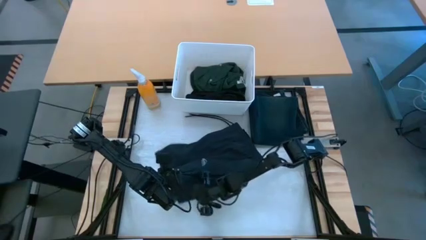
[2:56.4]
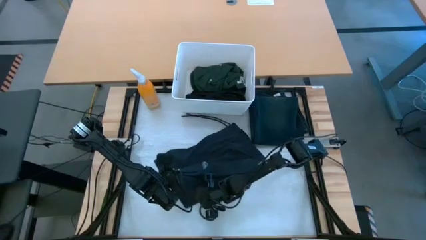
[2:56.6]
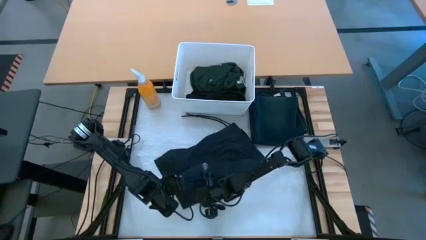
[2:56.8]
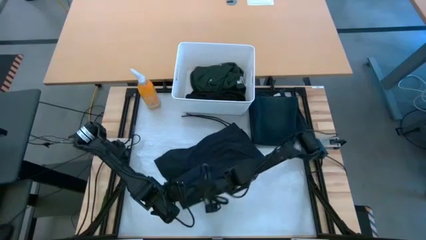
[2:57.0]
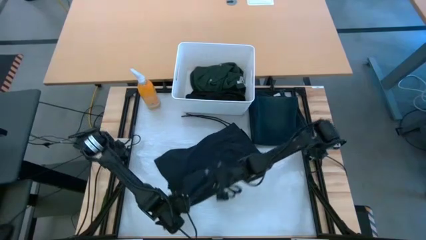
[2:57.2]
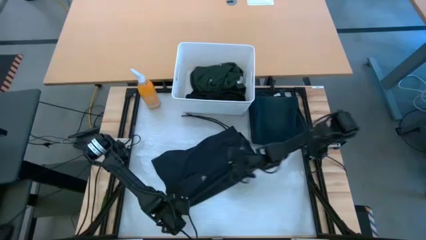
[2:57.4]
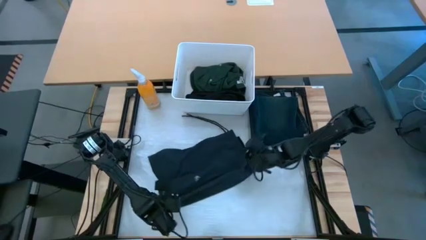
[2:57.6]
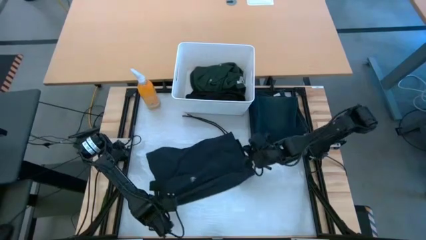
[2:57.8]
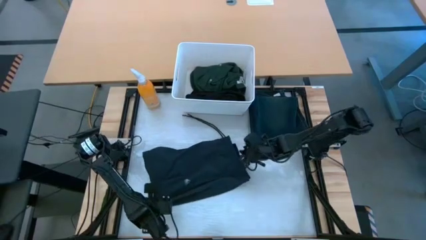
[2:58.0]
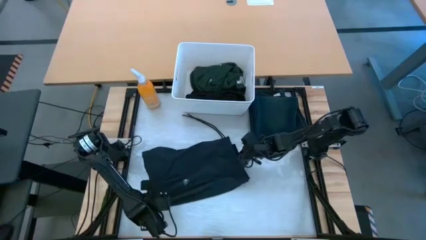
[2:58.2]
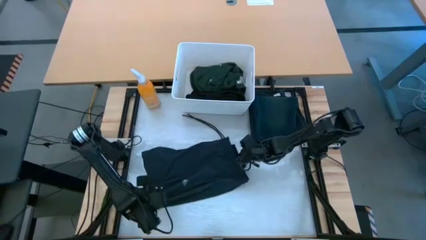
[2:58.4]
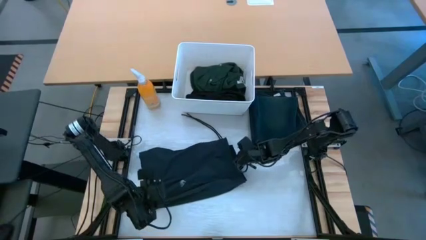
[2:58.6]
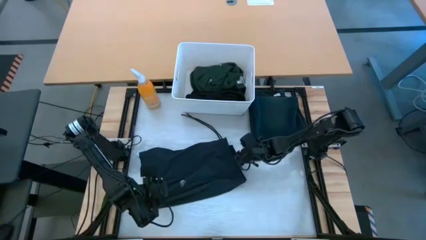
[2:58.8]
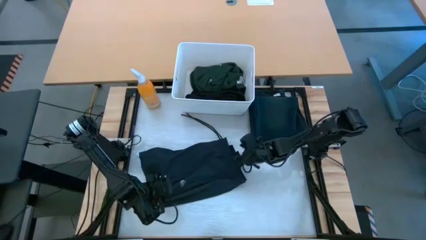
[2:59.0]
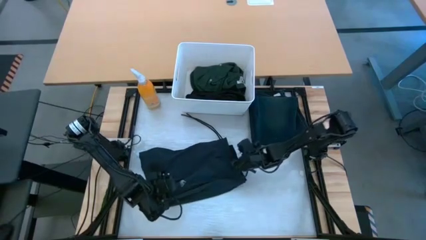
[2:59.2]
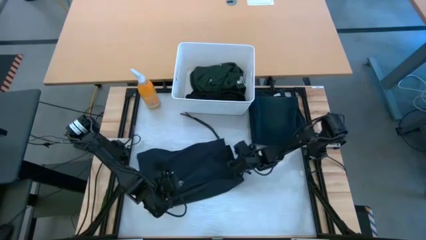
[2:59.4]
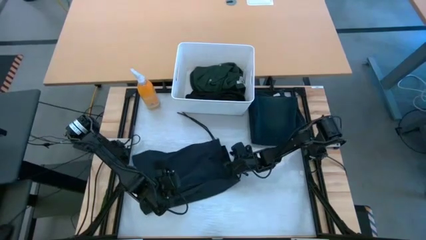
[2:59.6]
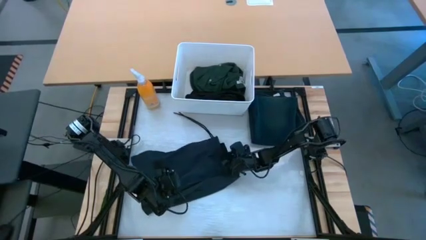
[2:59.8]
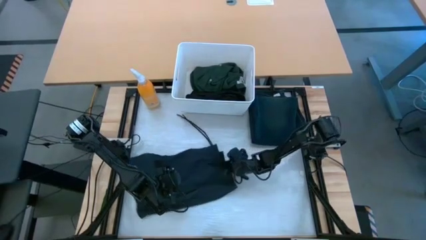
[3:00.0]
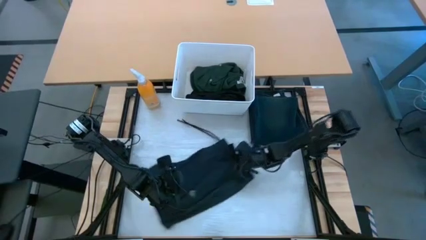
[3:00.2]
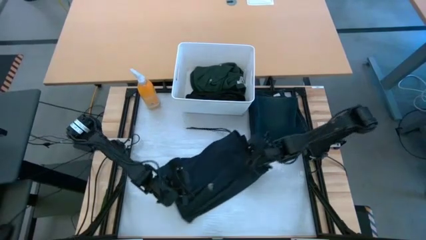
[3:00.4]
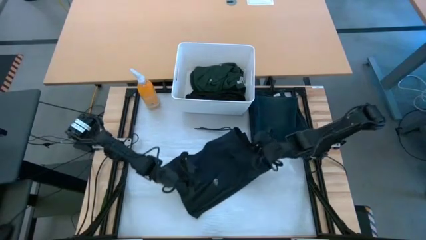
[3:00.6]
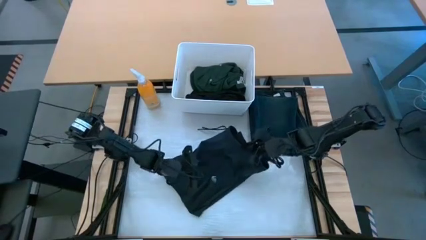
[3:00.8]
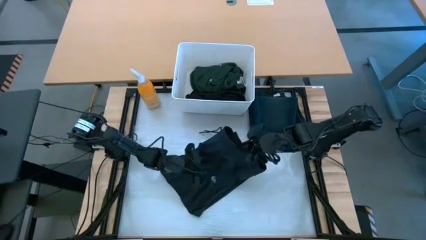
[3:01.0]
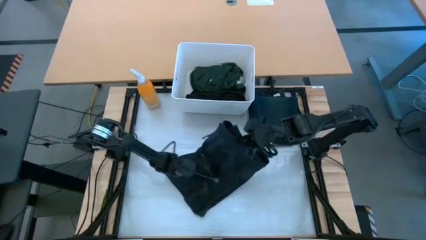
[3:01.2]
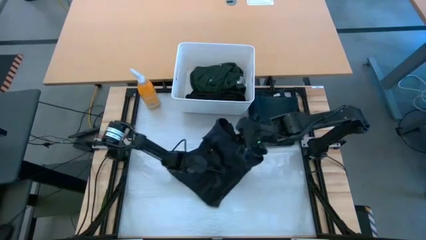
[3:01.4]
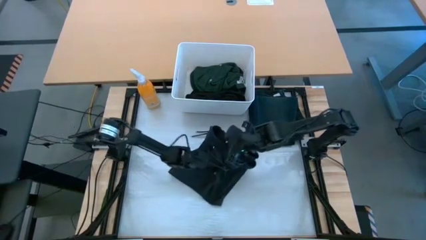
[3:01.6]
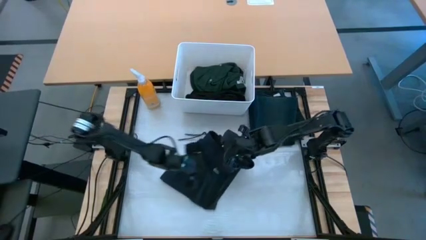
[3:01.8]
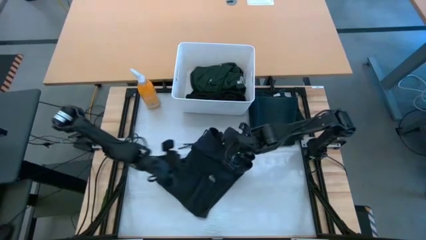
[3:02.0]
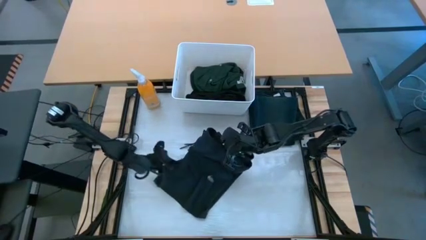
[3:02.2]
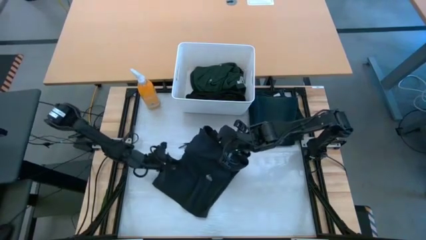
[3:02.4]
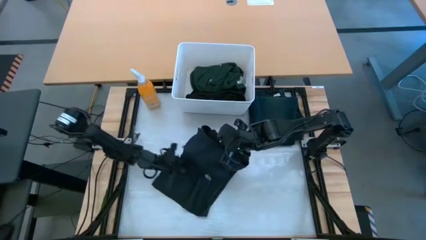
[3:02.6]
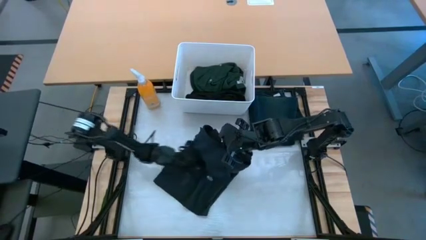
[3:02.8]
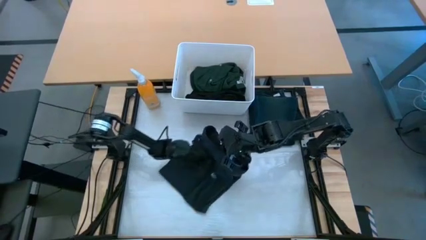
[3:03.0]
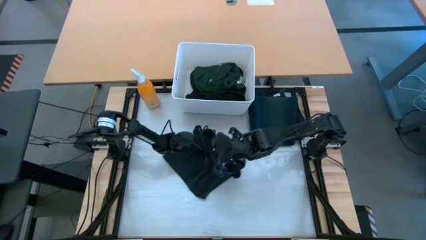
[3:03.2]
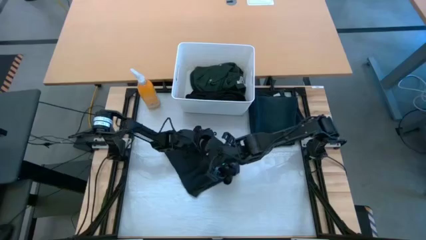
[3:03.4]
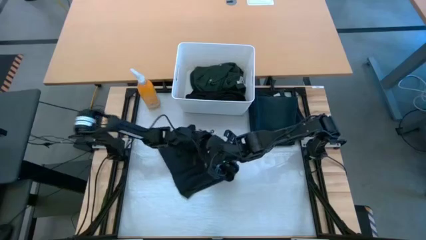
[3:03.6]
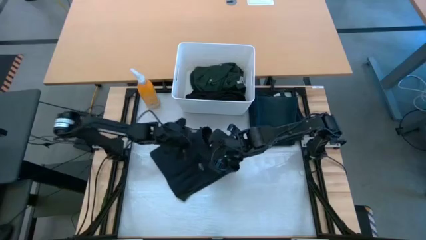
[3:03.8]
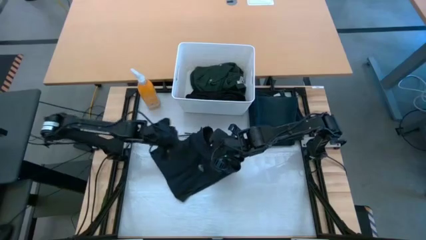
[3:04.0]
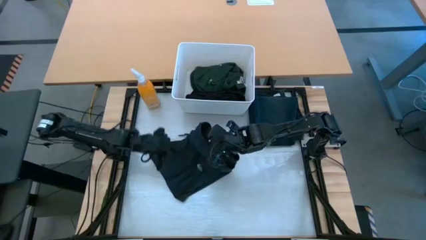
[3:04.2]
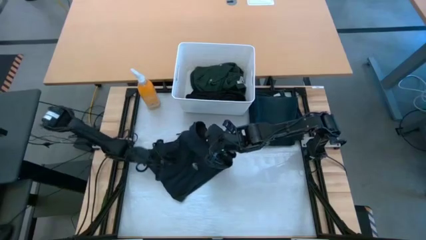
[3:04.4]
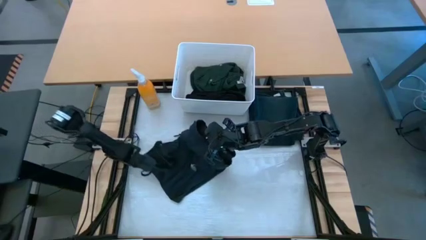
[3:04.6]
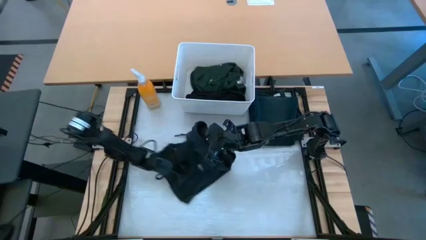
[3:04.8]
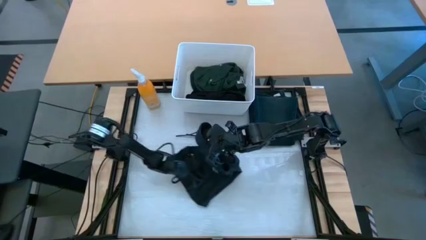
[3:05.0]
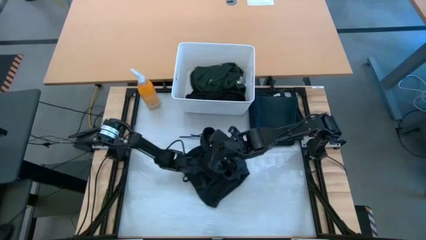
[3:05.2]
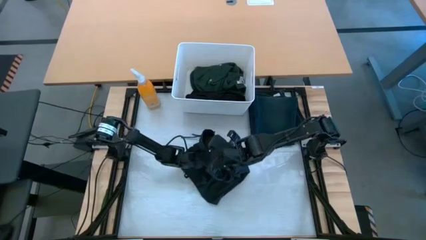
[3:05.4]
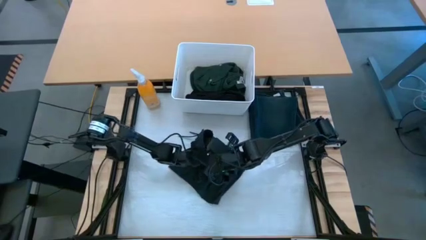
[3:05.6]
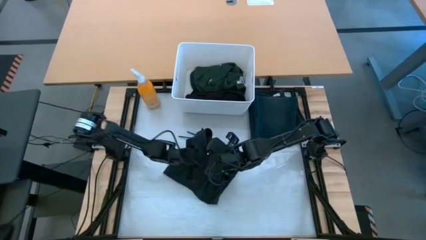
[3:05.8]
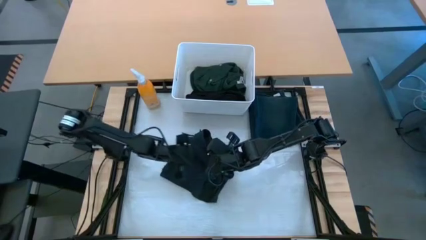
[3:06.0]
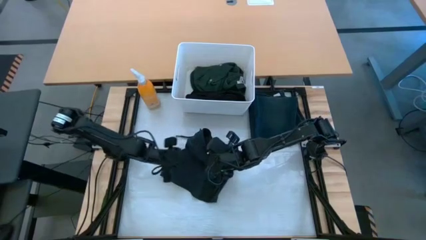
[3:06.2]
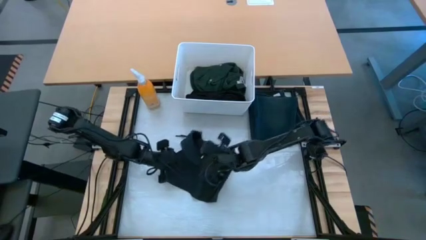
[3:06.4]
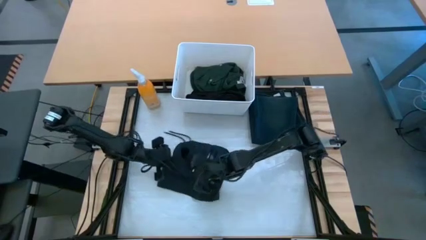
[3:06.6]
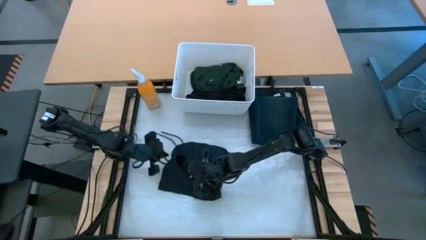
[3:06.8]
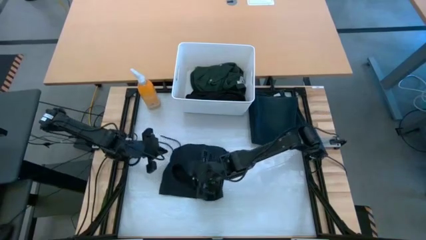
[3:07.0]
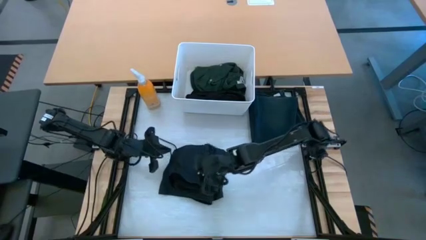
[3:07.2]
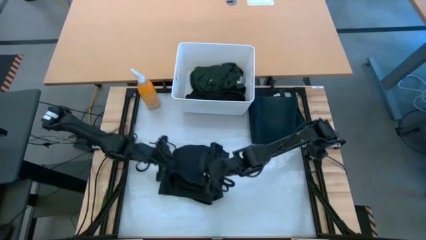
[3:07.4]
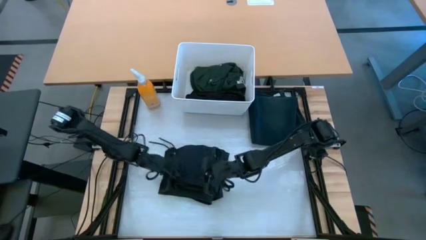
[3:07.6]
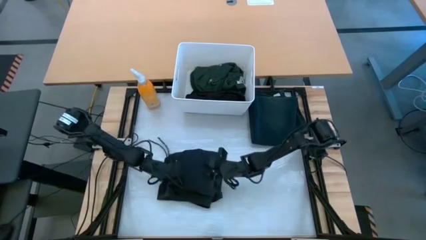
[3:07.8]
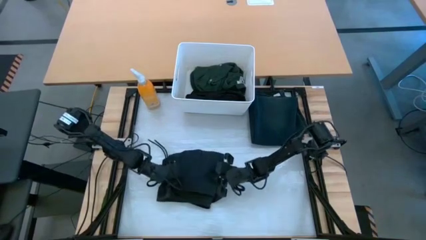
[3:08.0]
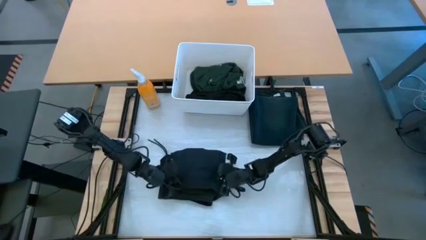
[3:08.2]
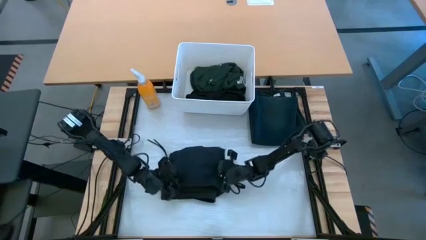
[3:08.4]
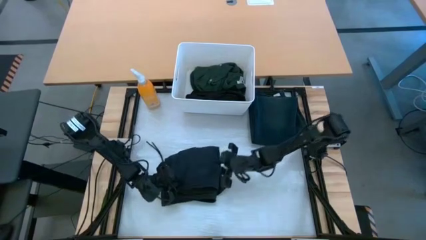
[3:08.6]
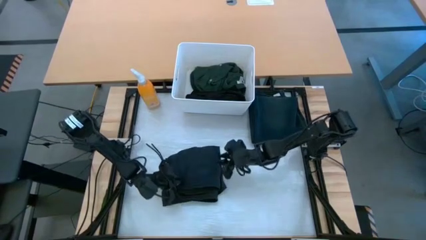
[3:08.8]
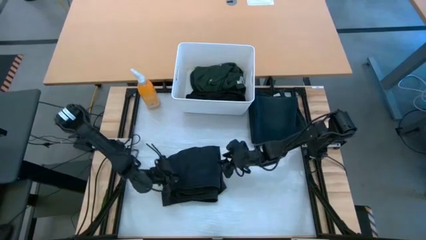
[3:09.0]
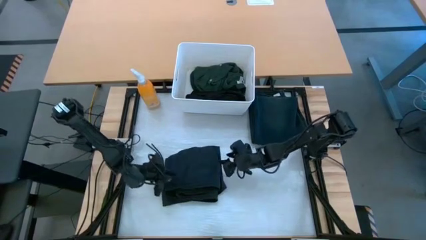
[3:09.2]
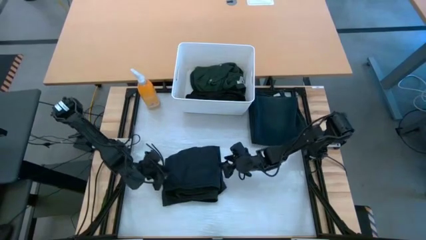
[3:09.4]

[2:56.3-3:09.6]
Task: Fold laundry
Fold the black shorts

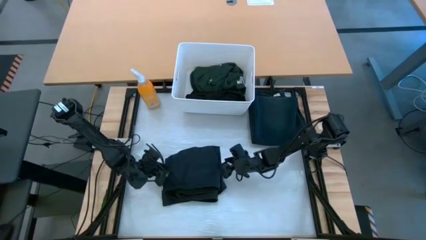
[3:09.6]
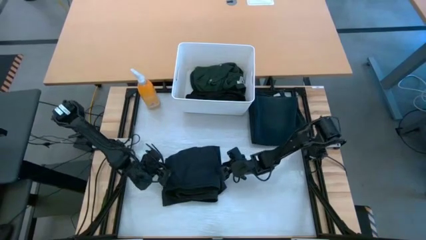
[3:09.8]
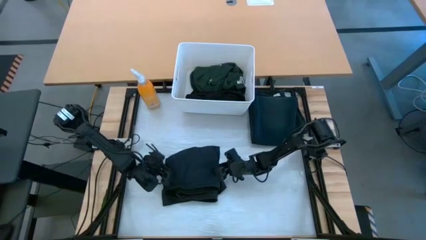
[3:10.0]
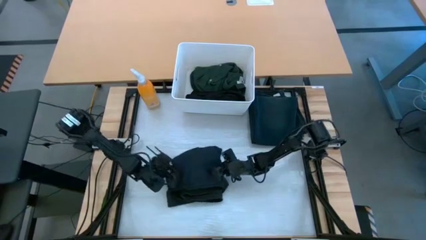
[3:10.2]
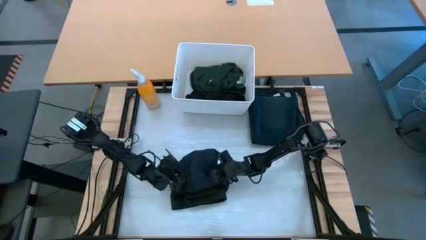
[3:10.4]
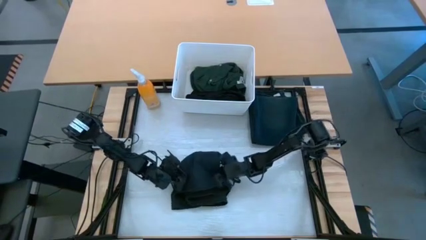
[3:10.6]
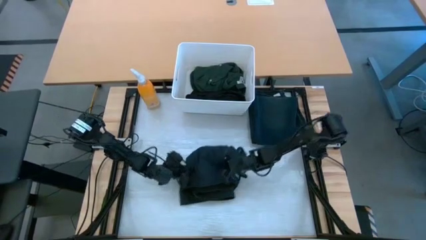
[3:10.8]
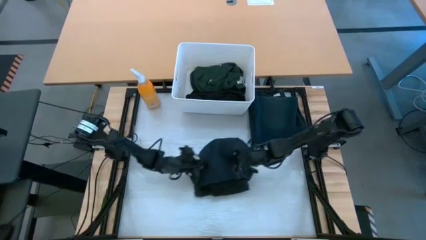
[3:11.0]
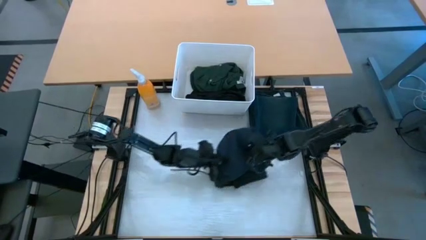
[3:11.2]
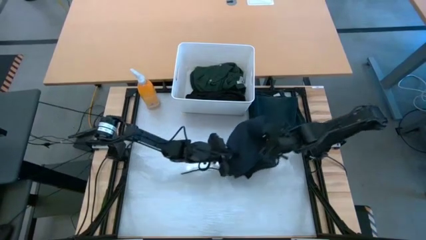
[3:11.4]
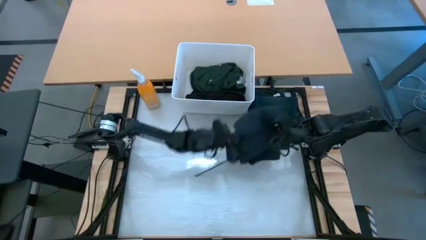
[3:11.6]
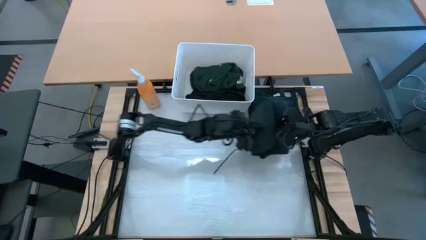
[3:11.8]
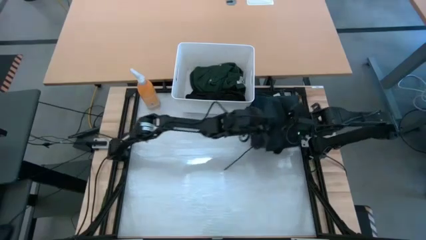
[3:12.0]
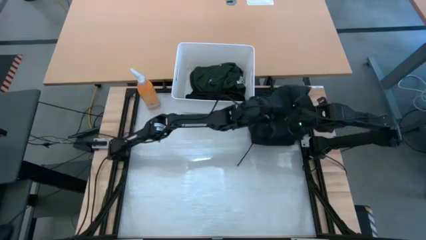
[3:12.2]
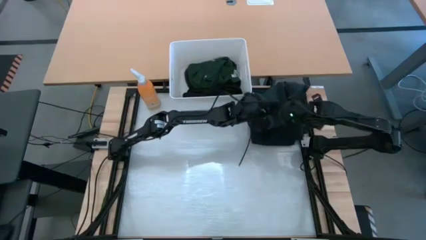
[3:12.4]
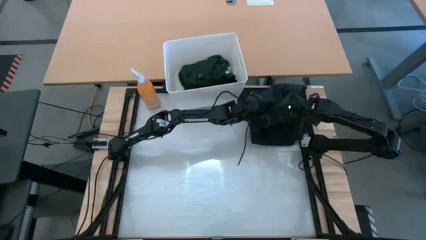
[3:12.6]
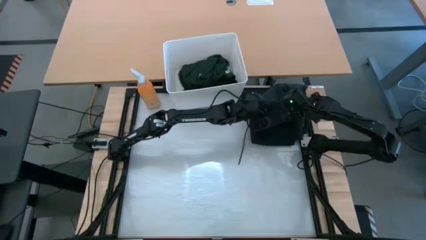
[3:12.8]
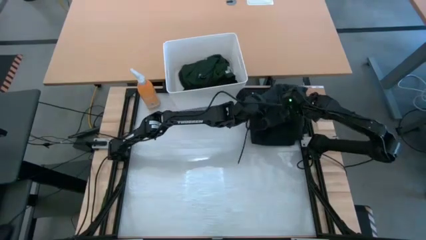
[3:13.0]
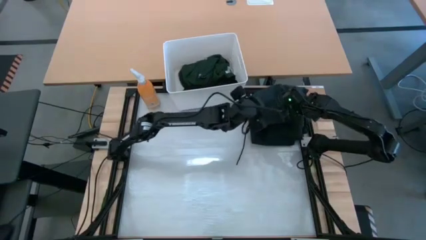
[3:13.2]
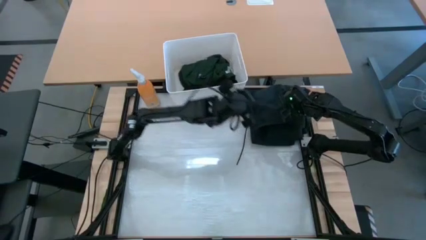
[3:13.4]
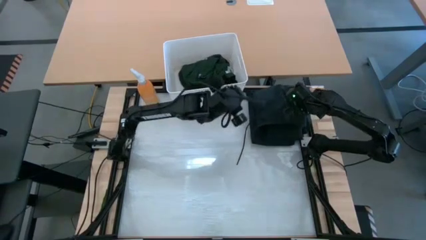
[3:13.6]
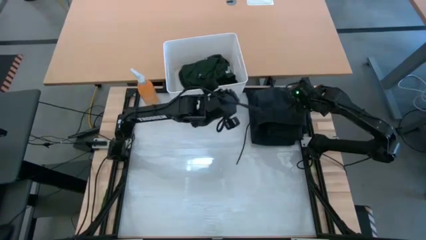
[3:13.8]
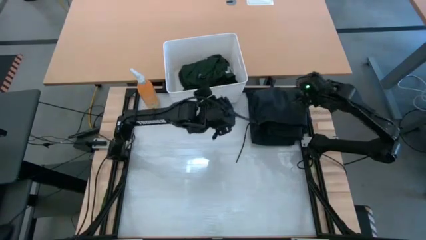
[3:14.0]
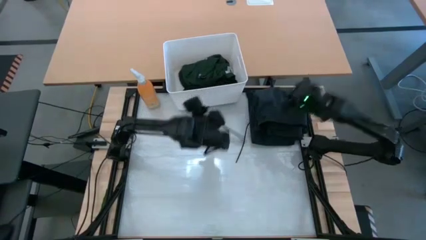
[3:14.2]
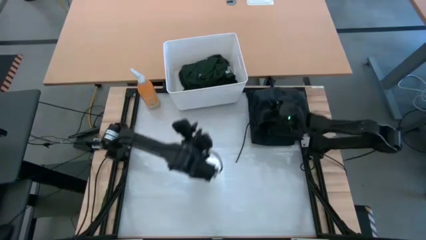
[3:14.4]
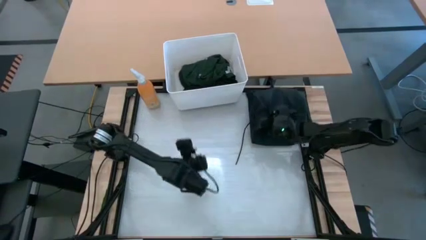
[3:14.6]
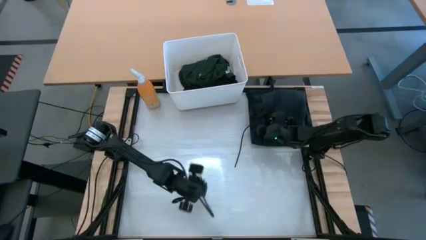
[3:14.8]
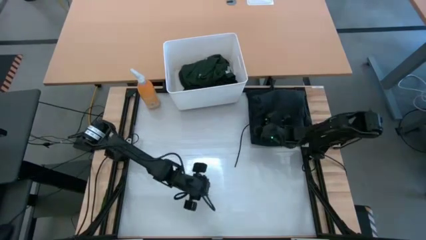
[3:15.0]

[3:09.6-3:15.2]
Stack the black shorts on top of the blue long pants
